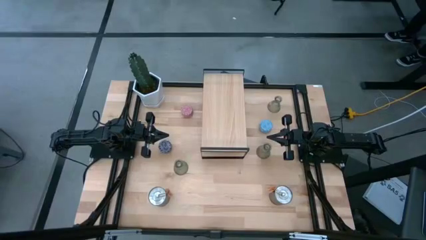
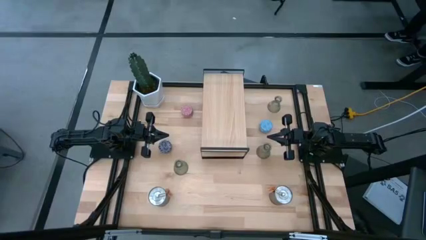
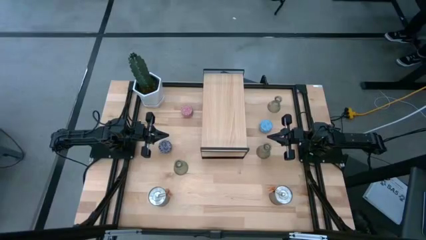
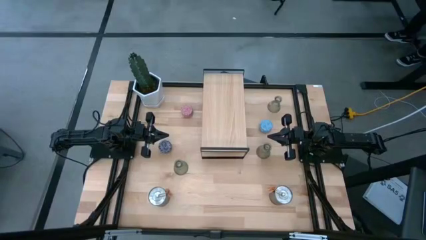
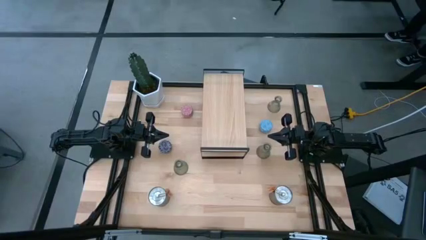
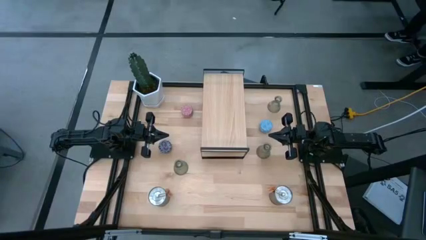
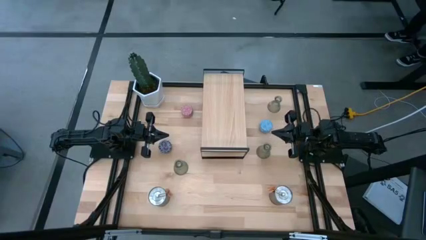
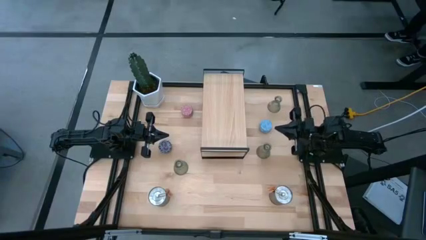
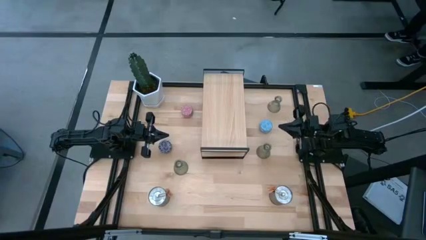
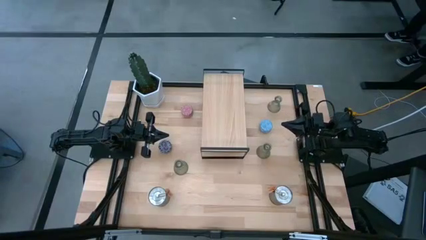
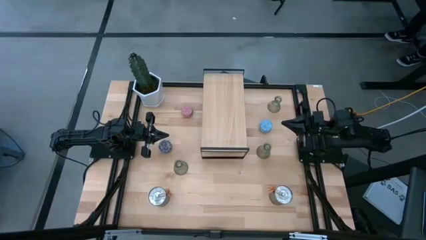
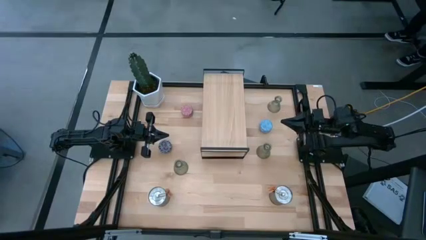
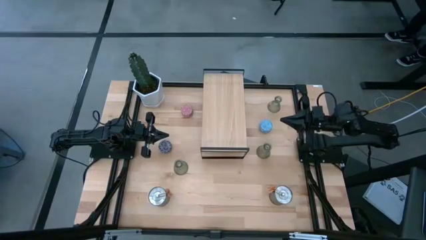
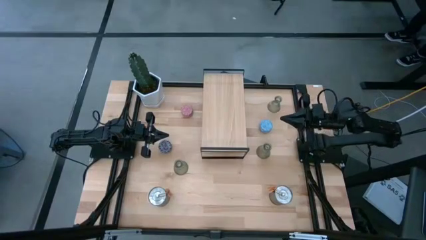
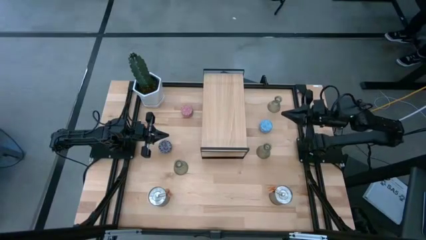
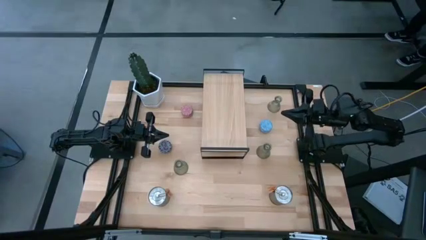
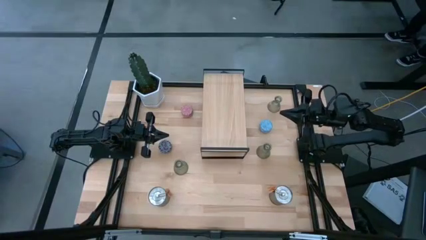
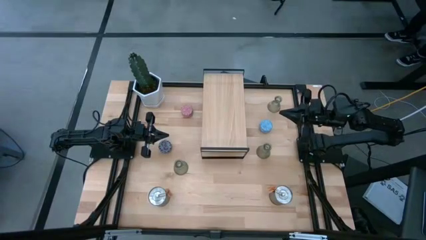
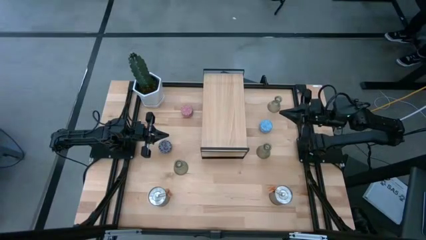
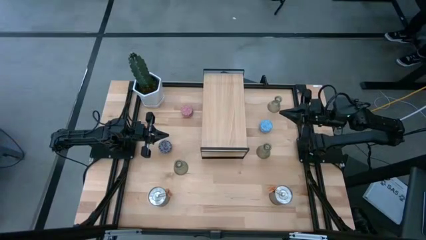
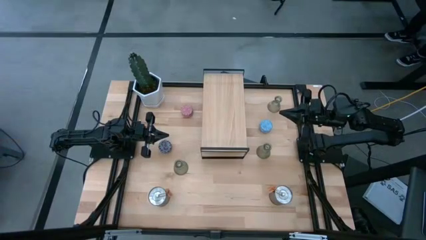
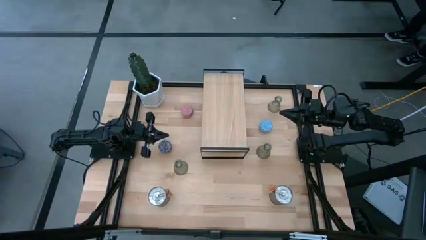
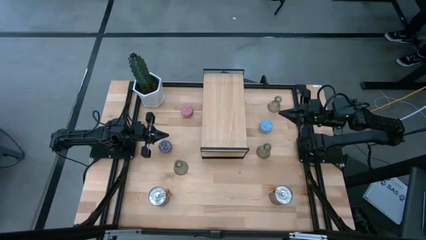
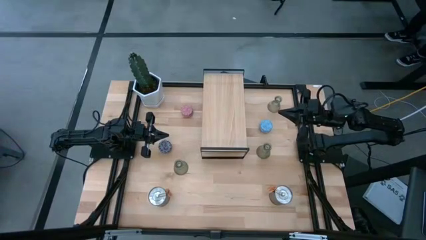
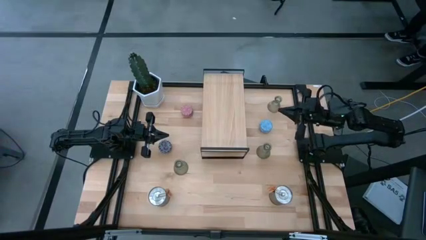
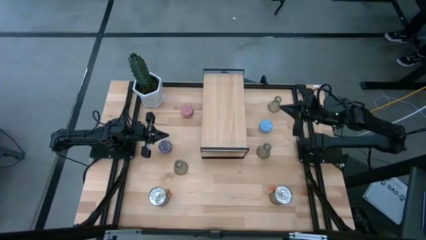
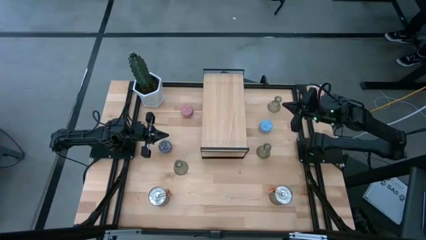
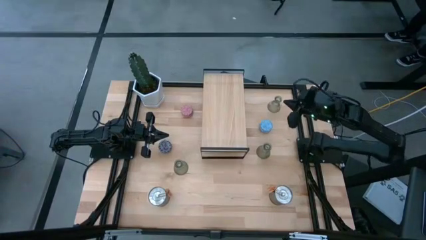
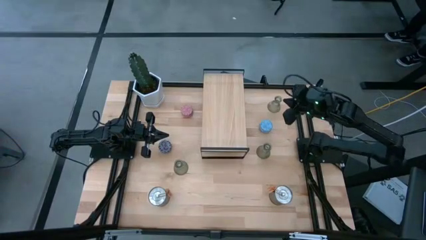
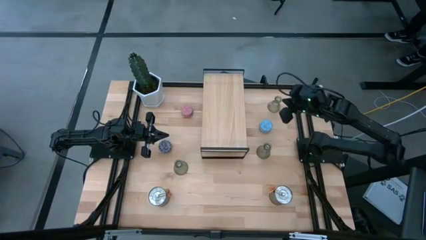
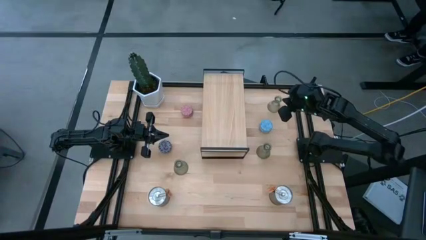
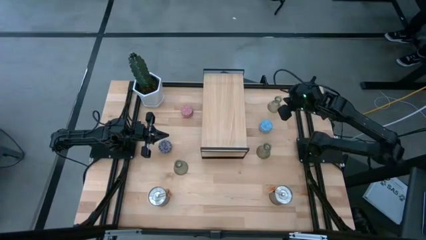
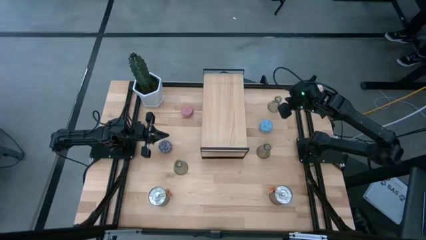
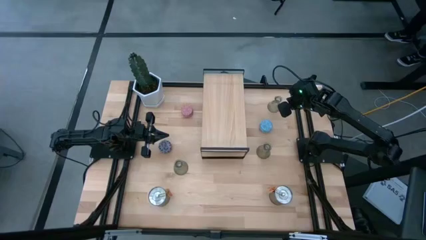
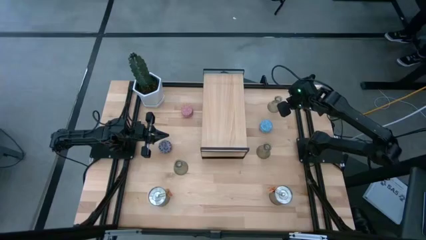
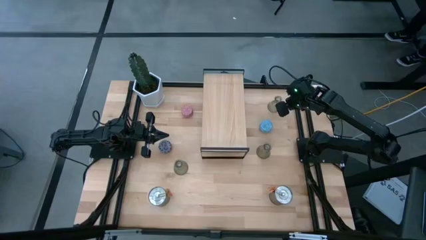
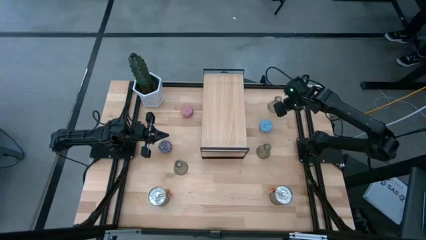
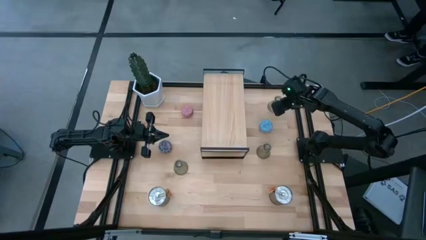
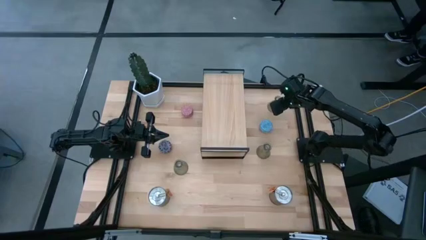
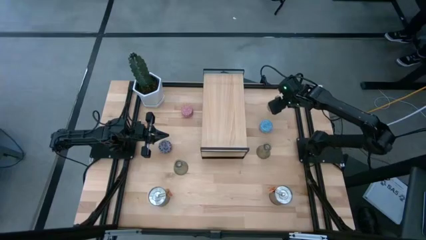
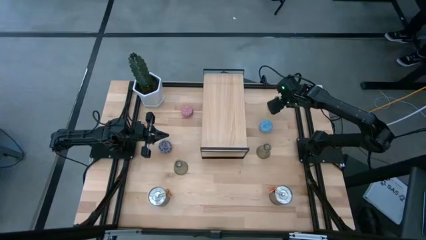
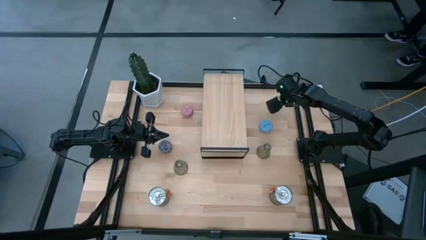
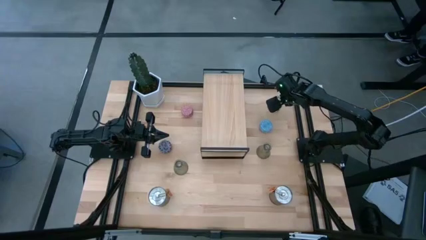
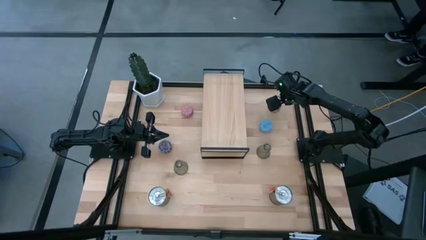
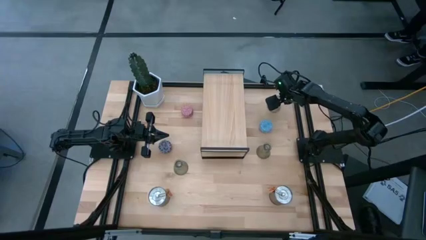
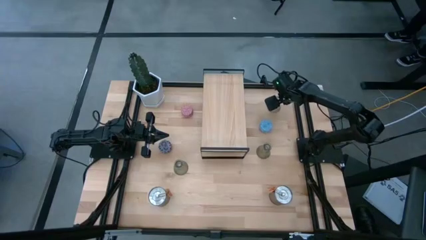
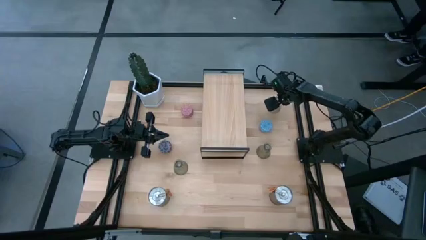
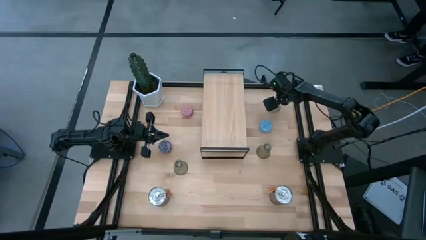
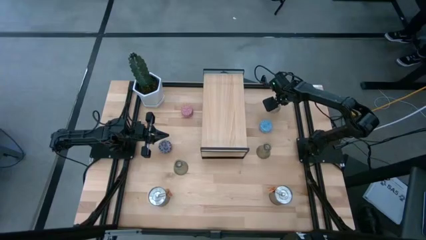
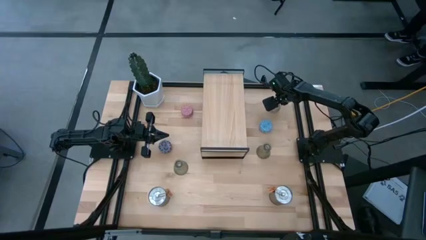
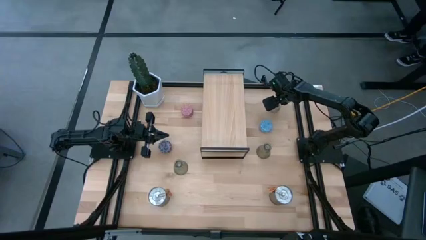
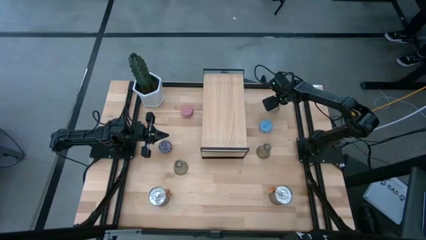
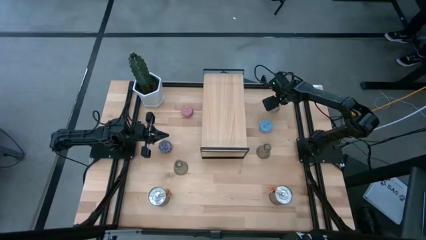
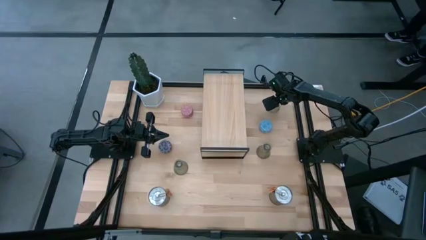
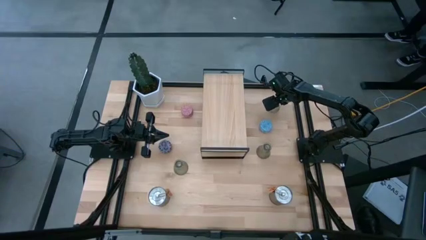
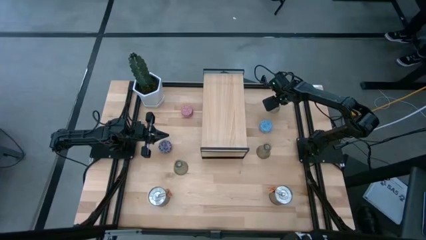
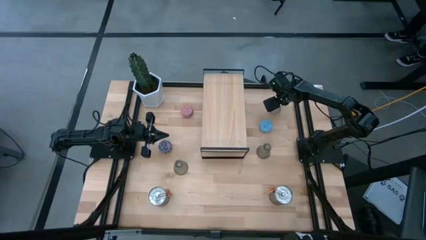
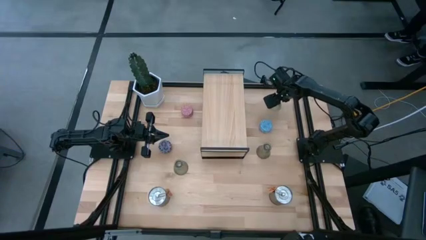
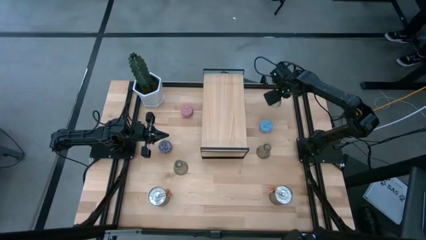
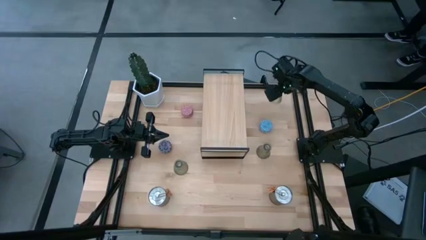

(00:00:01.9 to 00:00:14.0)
Task: Pick & Place candle stick holders
Put the top transparent candle holder on the shelf

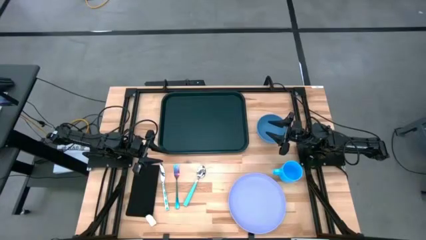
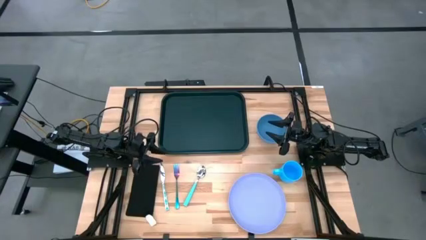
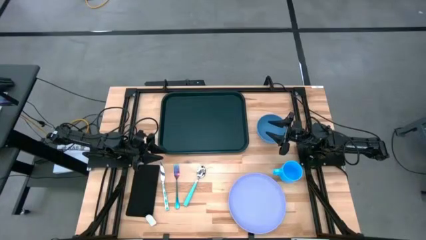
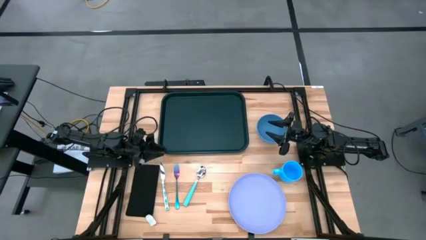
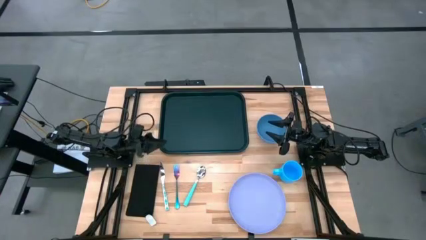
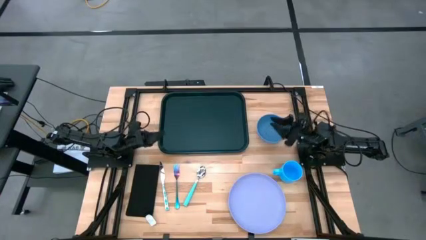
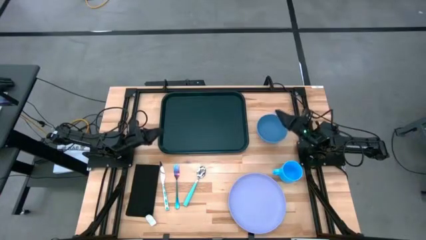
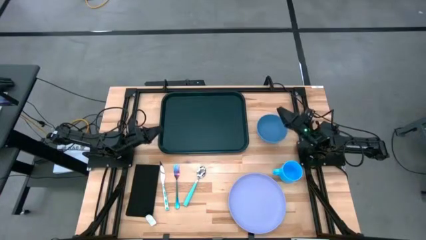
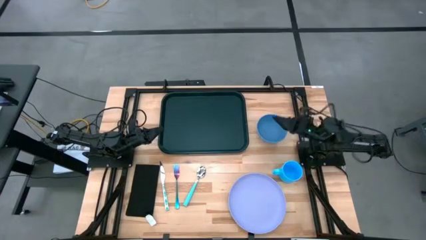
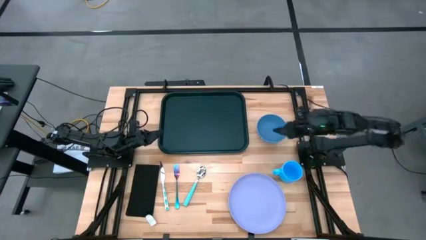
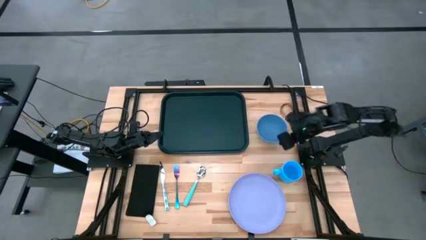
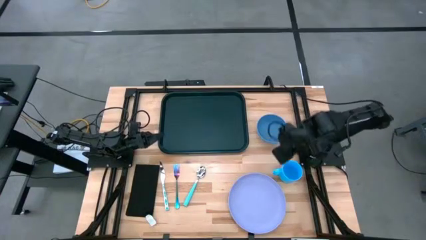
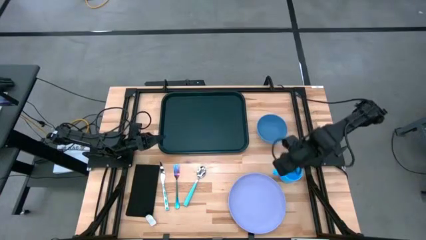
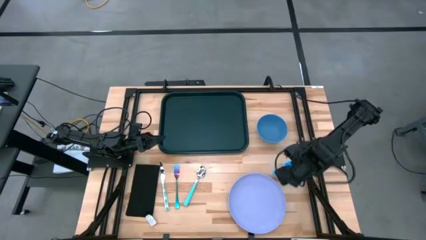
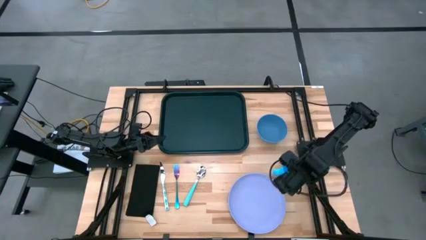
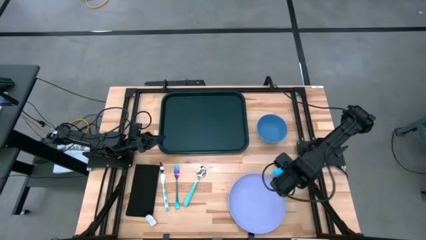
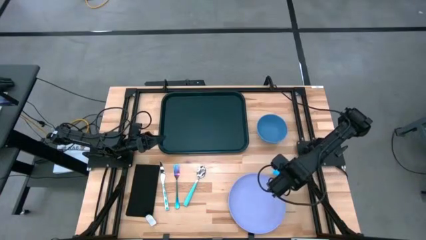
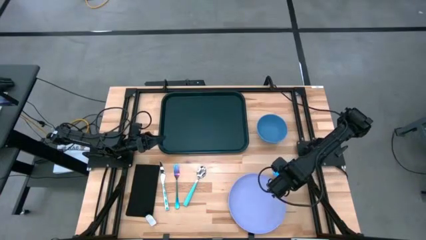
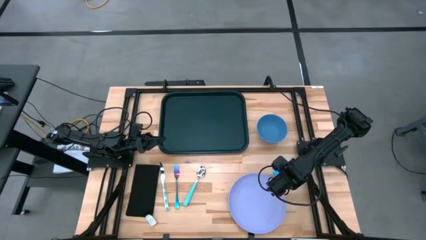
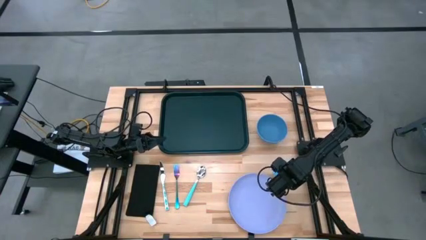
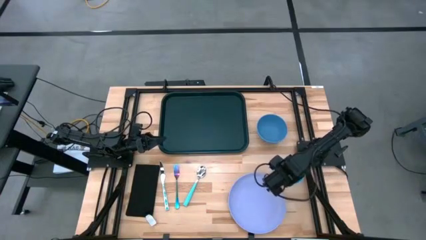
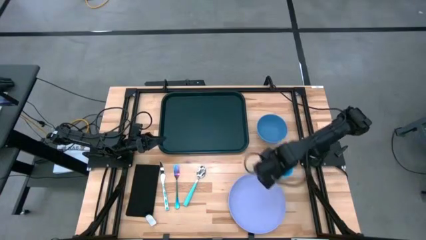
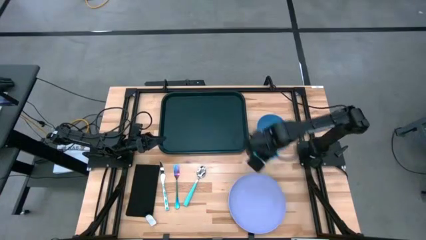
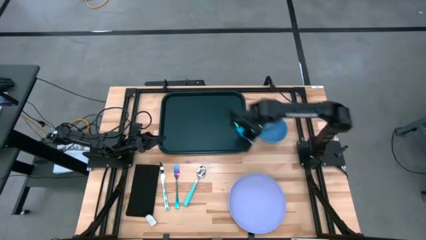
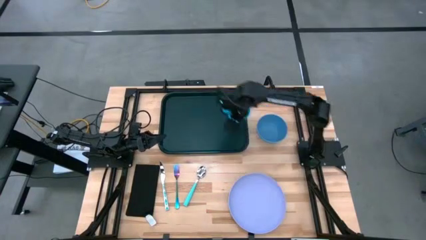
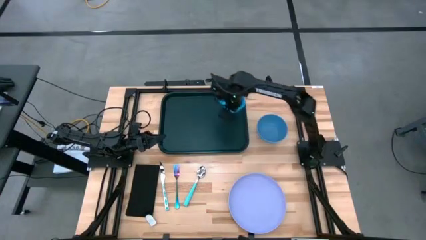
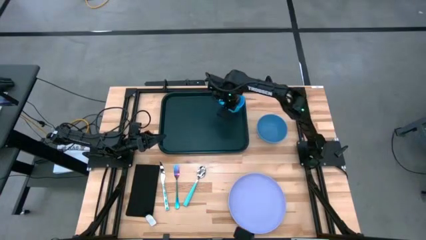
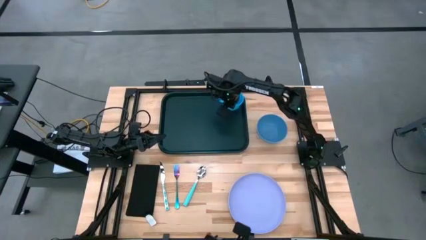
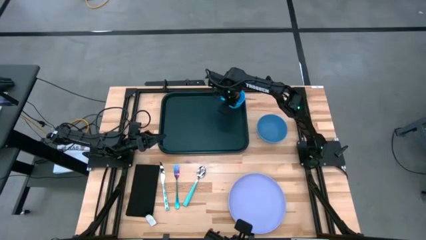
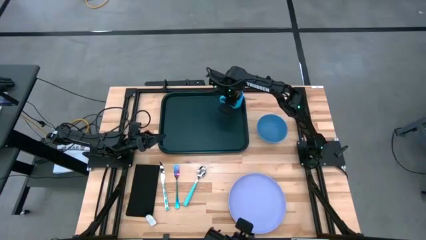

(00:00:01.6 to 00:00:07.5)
Task: Set up tray
Put the blue mug on the top right of the black tray
